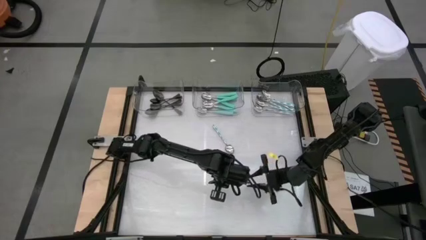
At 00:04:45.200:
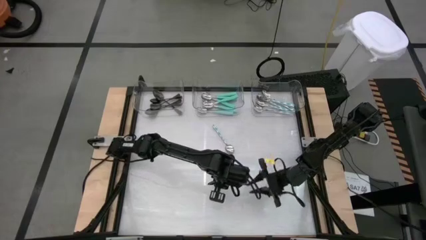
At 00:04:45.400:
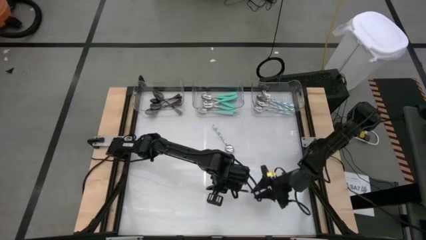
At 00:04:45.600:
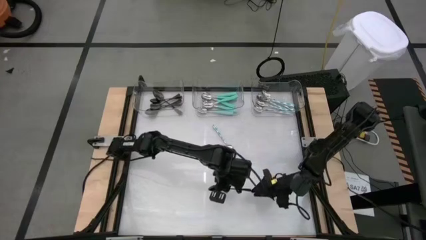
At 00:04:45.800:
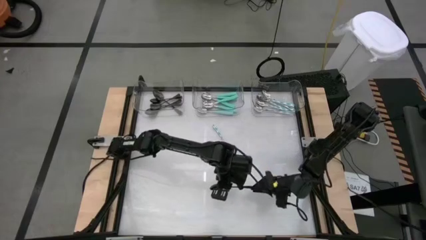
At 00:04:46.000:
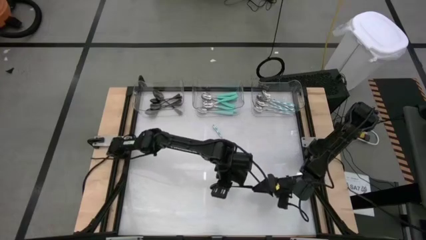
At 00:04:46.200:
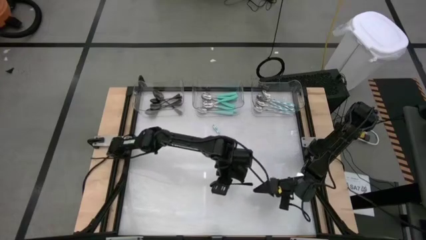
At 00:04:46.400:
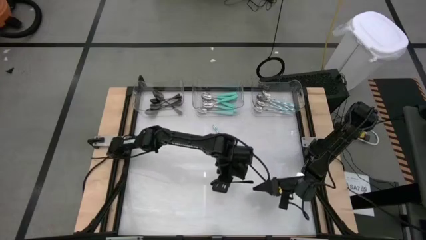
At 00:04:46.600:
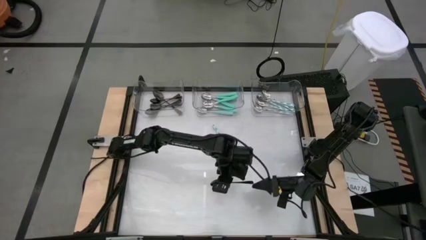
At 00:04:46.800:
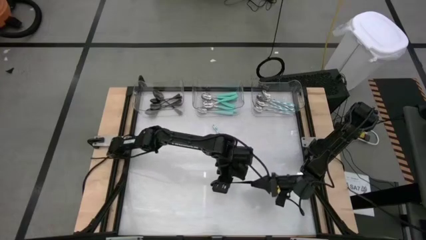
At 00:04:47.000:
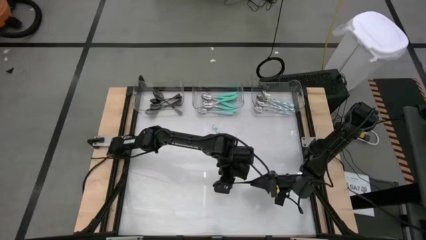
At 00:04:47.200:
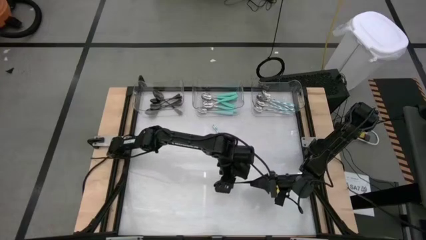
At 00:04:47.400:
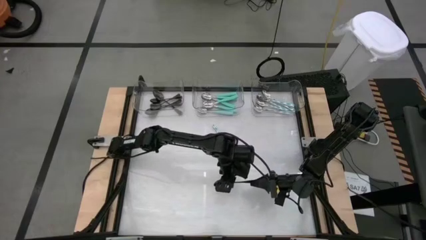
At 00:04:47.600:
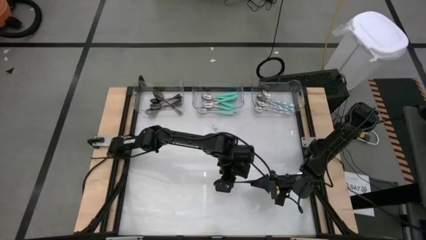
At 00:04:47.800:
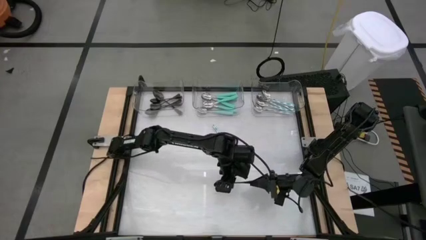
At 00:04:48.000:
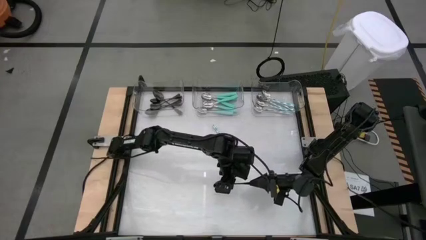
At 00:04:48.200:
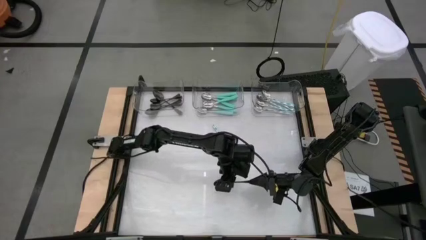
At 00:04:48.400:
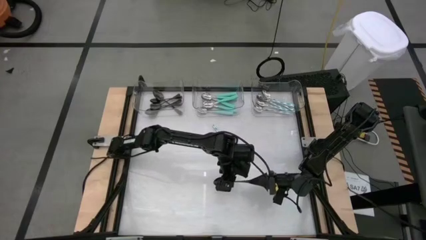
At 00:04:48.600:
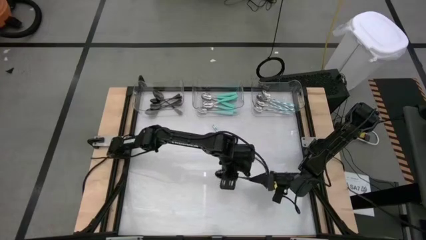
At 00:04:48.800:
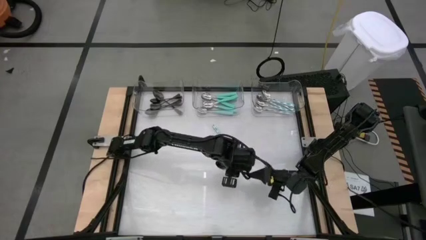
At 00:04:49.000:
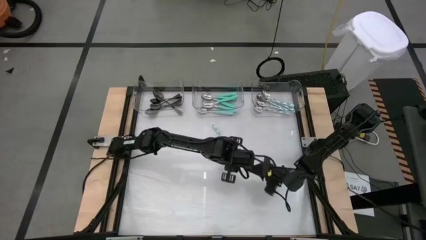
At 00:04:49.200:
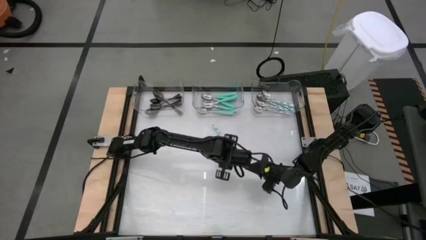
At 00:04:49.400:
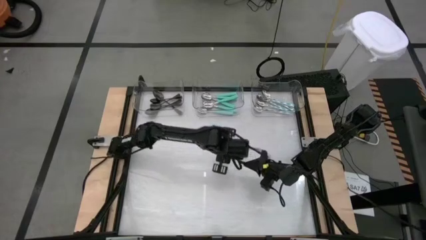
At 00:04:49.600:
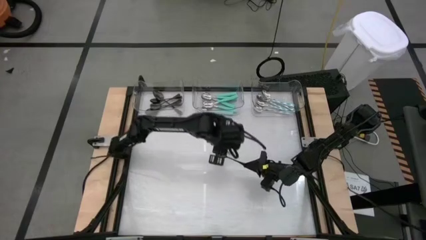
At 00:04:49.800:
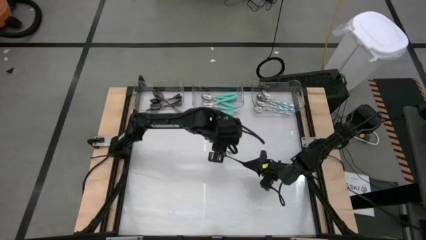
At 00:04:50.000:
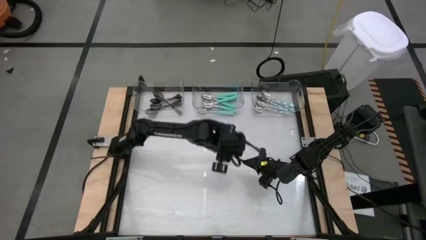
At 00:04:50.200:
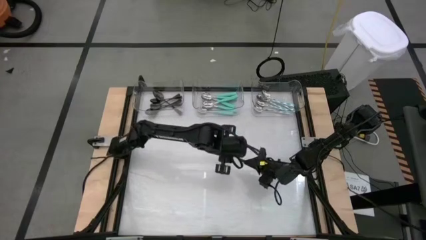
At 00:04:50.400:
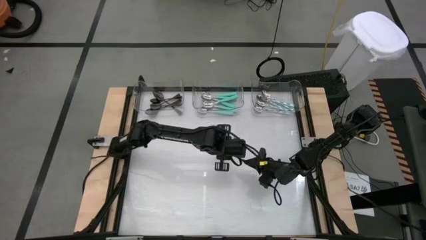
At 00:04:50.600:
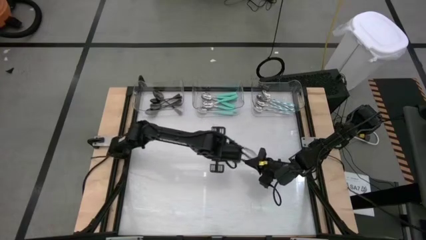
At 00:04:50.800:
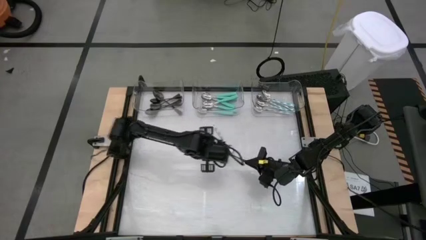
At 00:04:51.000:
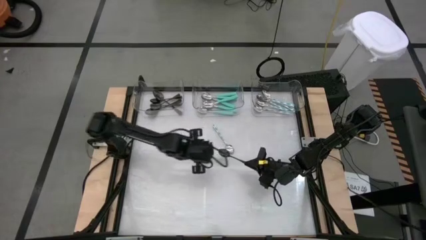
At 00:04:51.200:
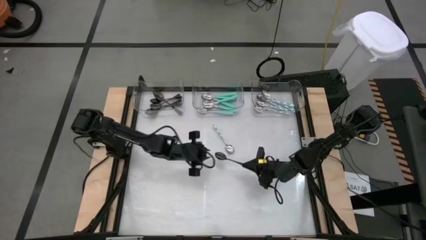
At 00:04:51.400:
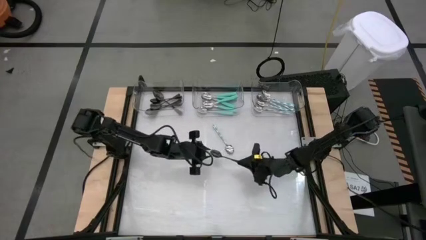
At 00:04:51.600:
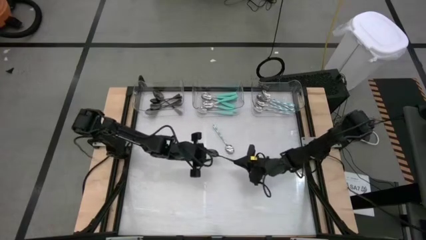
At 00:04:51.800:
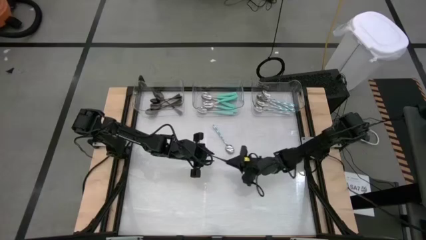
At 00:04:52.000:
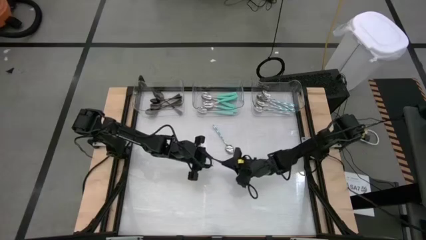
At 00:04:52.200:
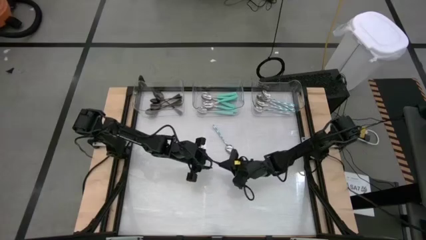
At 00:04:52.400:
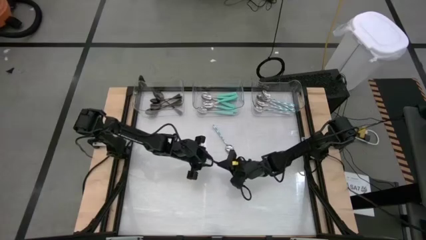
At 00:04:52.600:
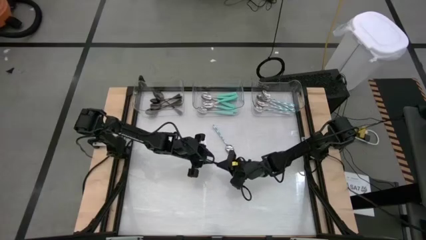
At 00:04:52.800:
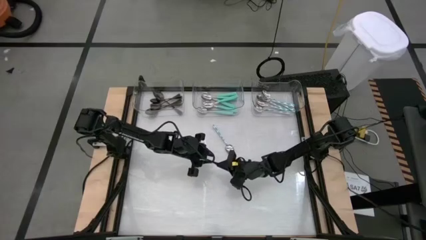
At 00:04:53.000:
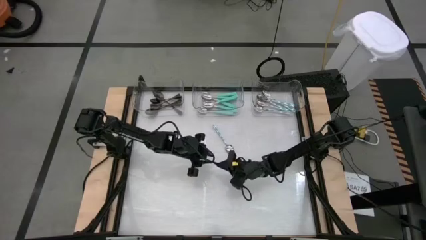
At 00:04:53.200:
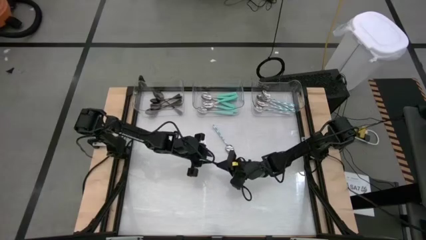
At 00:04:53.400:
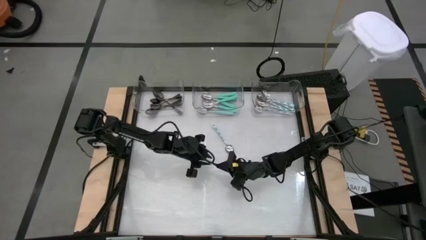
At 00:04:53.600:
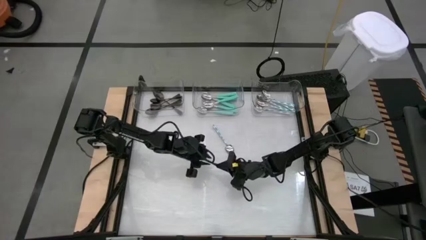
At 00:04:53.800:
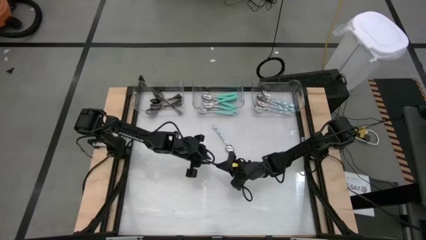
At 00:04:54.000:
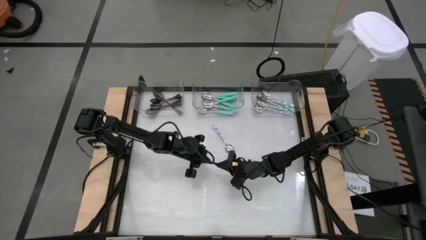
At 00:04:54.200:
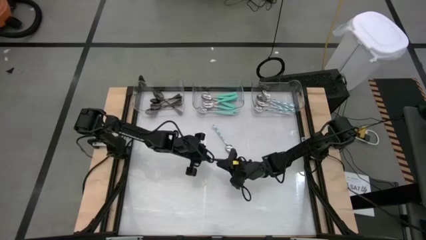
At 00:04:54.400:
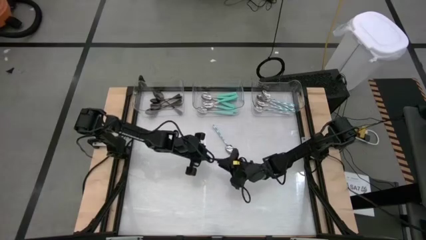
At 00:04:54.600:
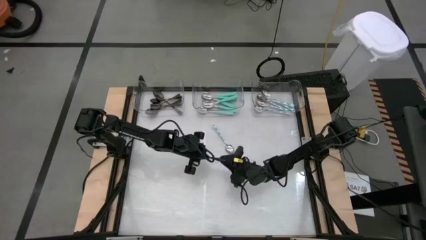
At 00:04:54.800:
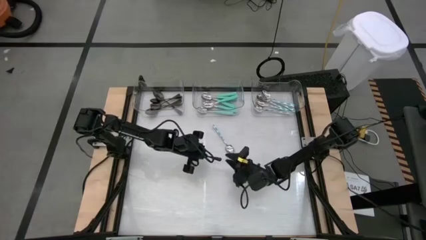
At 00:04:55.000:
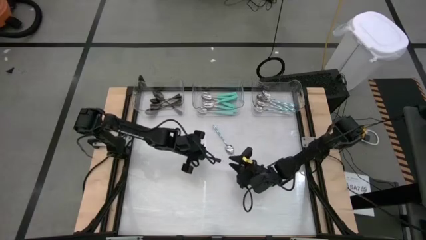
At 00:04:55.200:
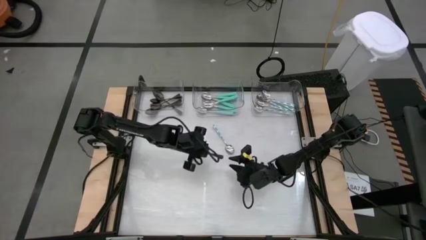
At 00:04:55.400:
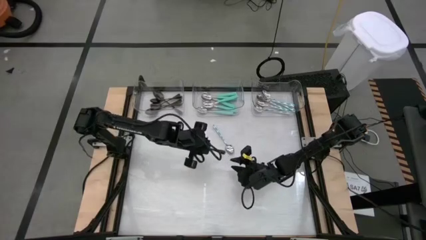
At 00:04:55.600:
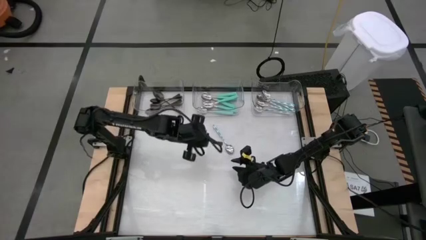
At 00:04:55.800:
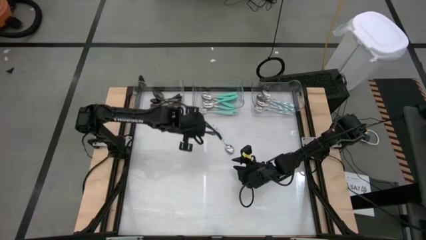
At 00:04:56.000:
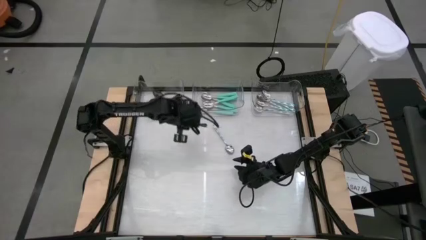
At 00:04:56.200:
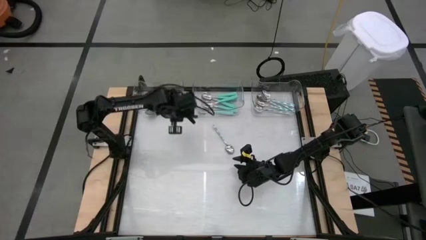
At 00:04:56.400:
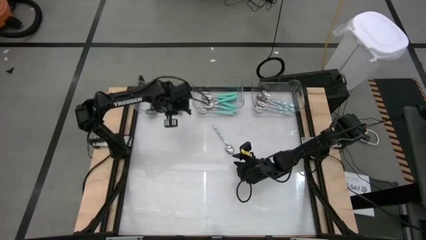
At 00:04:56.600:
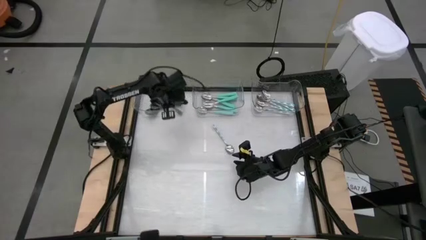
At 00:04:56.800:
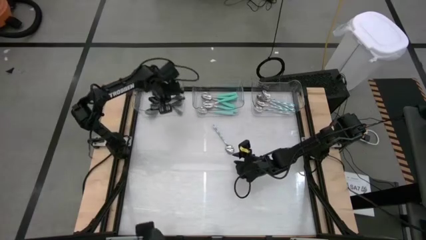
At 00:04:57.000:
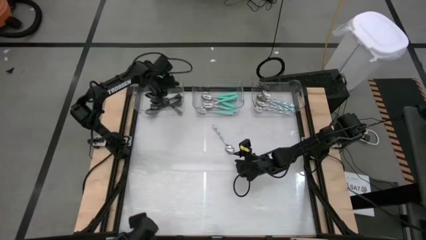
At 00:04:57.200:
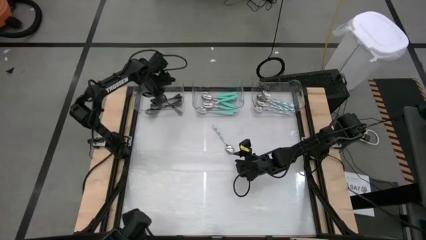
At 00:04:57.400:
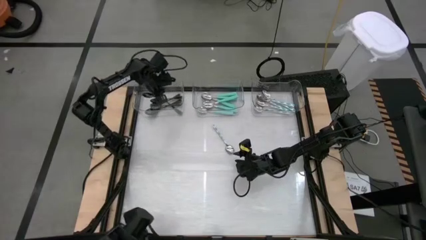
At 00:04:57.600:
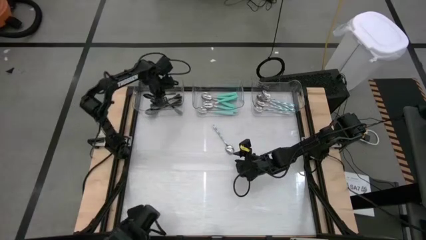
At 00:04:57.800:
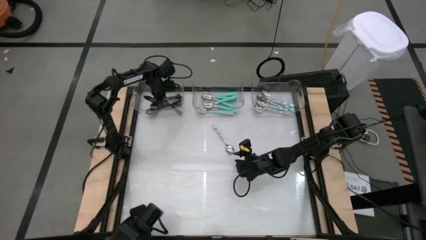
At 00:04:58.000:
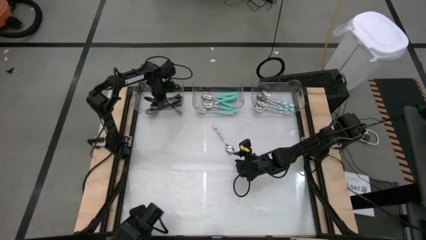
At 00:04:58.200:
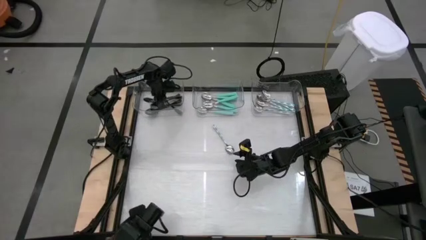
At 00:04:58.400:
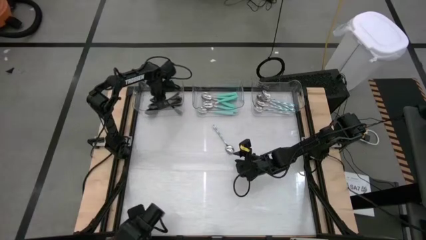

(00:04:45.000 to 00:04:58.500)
Task: Sort silverware by color (type)
Put the black spoon into the left transparent bin
